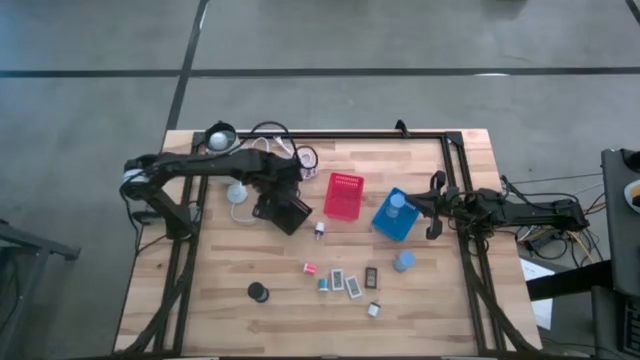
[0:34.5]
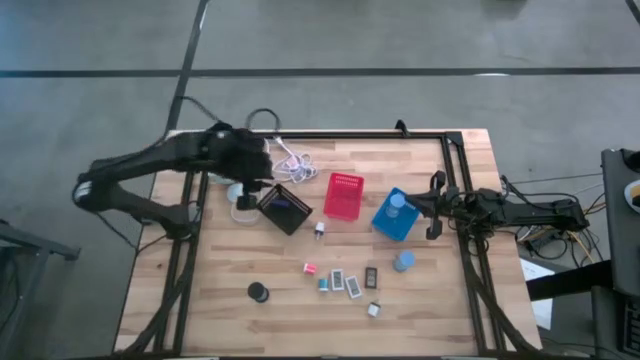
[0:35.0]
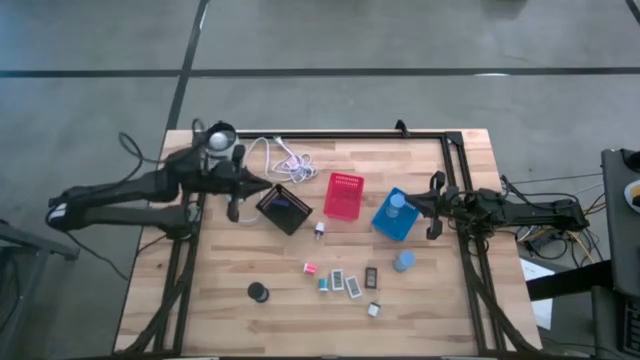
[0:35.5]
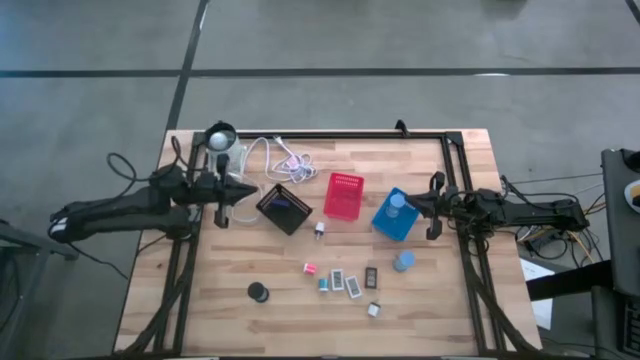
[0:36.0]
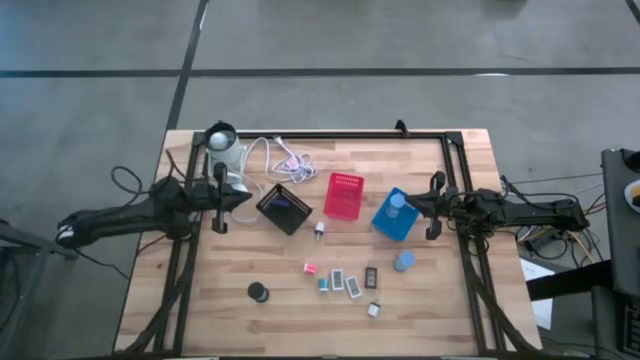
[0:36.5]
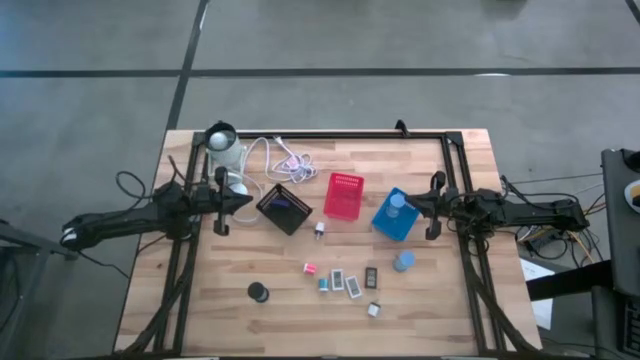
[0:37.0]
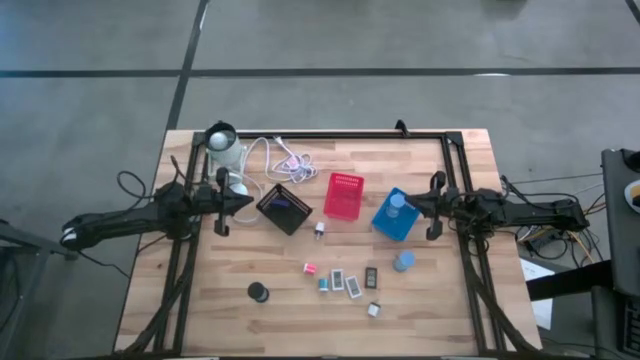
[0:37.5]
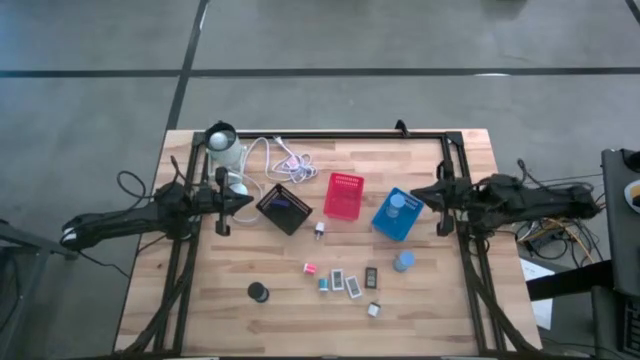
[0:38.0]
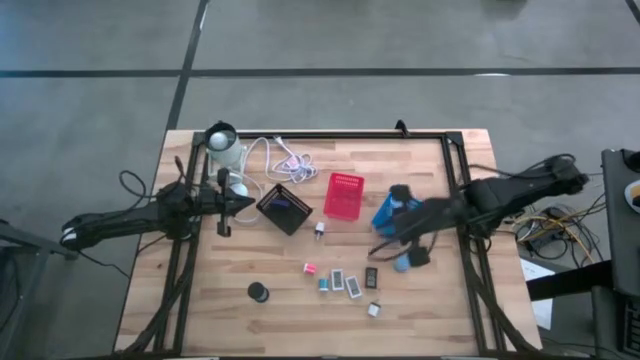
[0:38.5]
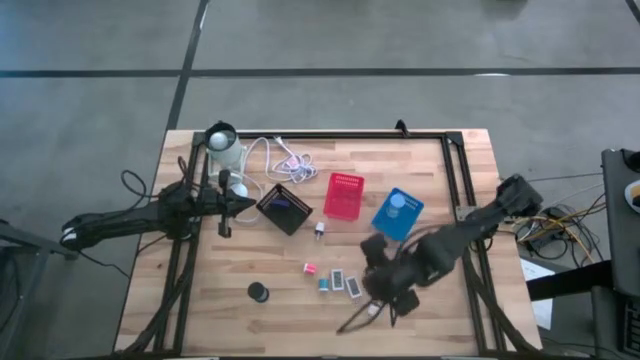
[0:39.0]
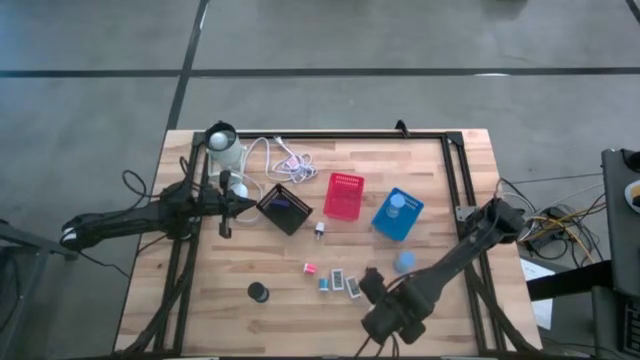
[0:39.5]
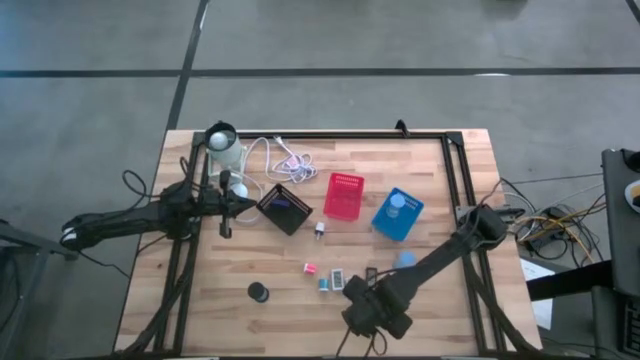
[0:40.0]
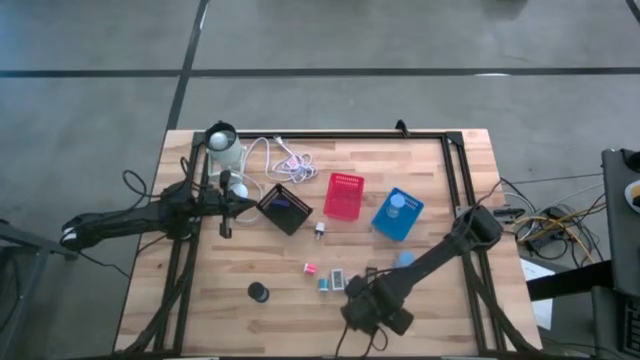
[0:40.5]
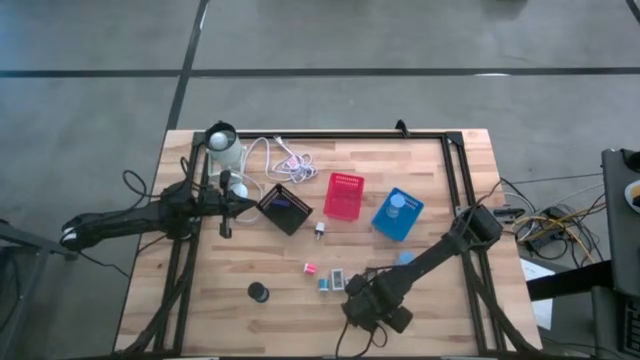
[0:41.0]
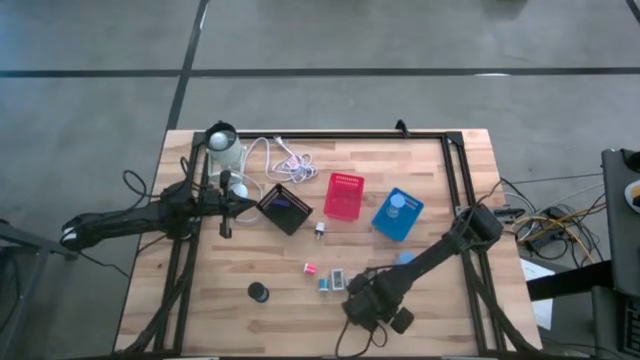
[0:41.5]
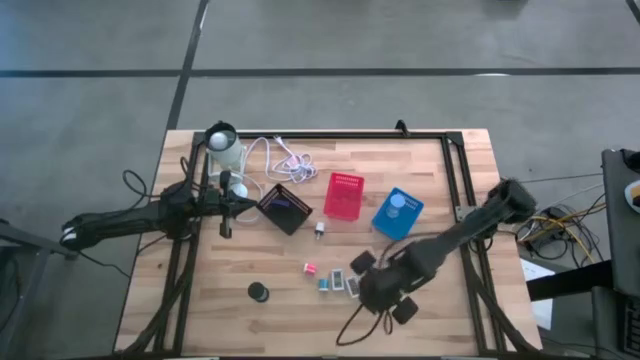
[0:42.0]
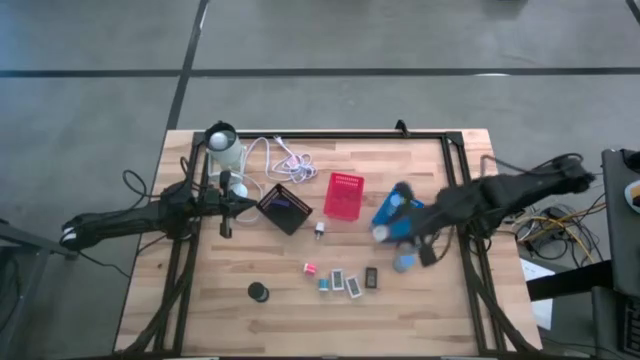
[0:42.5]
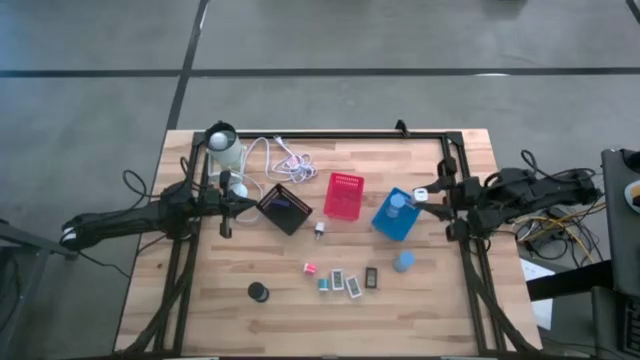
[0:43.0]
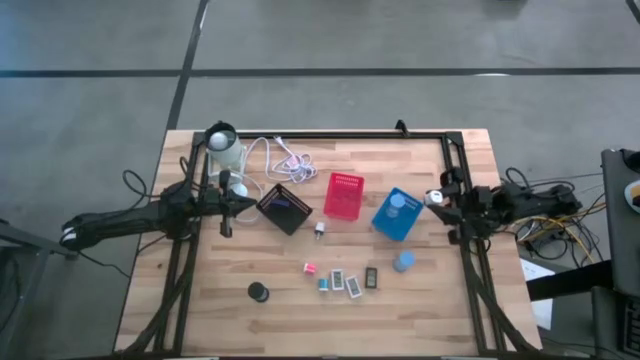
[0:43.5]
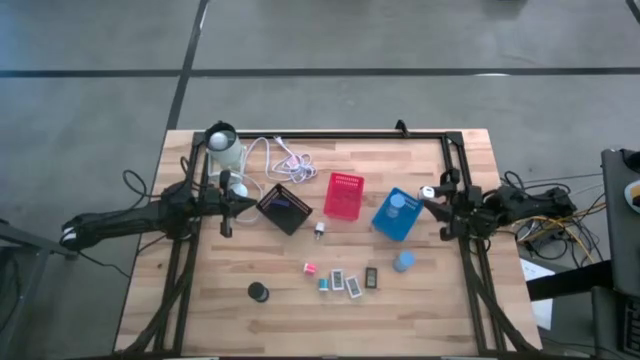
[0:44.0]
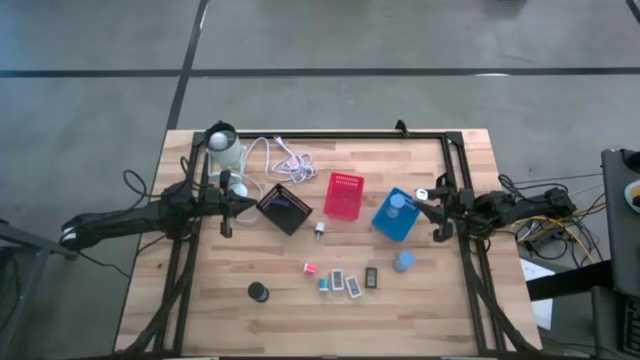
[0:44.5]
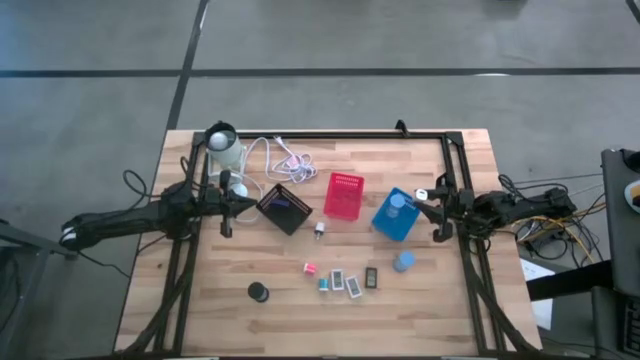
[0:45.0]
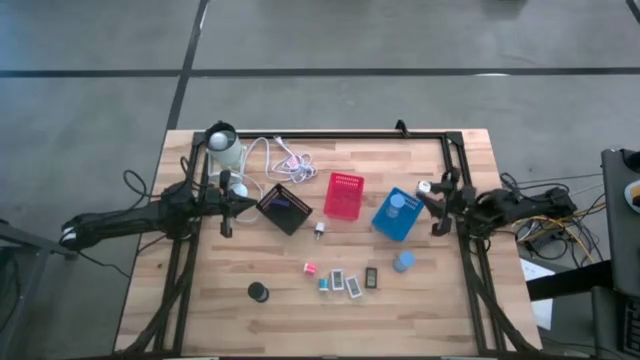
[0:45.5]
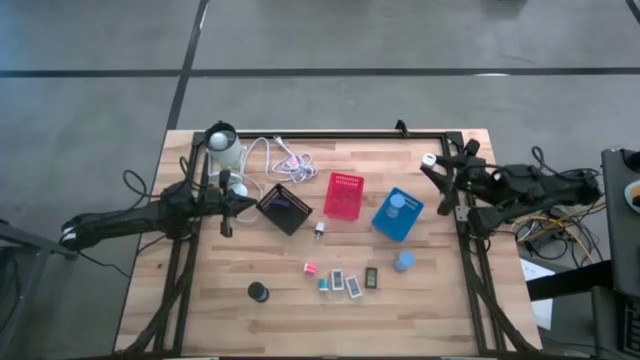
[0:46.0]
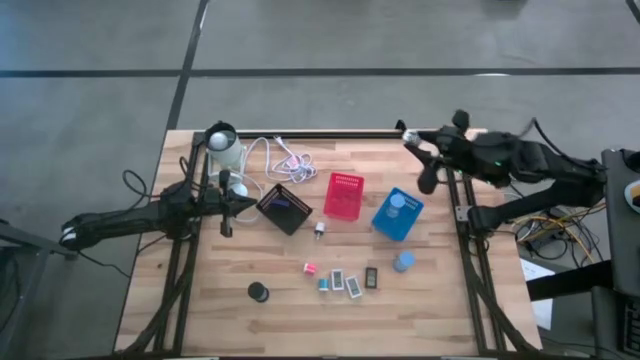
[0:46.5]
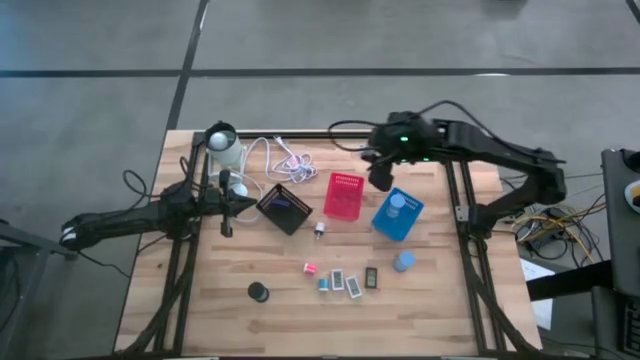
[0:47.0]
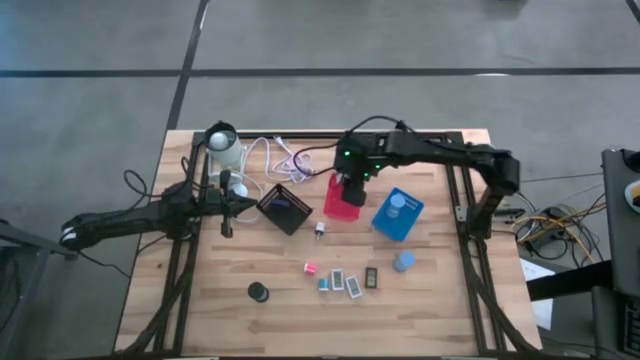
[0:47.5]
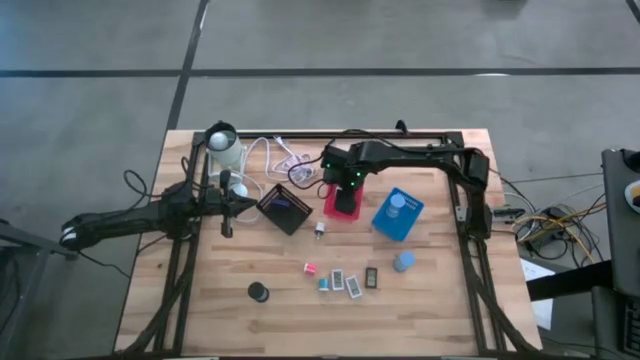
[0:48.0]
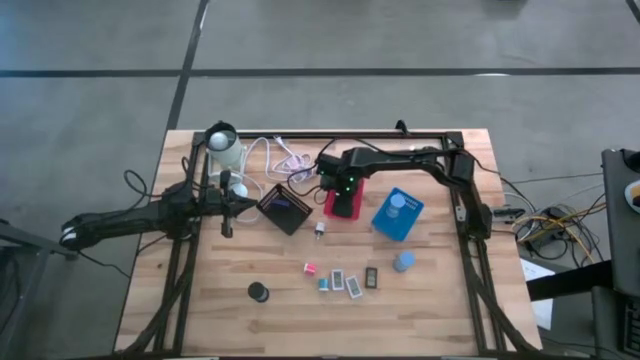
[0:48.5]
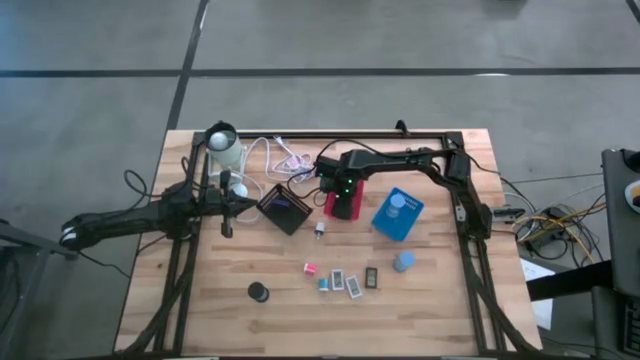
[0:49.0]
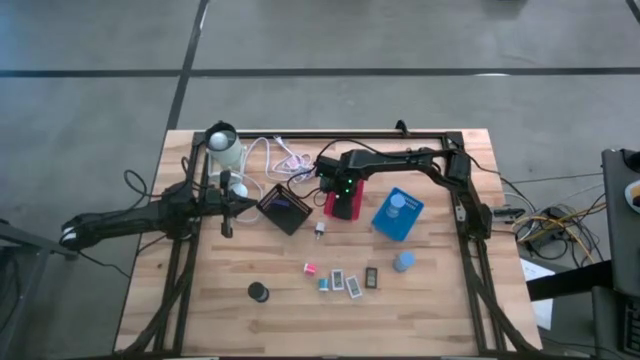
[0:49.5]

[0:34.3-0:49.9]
Task: Pick & Place Office items
Put the white charger adapter into the red basket

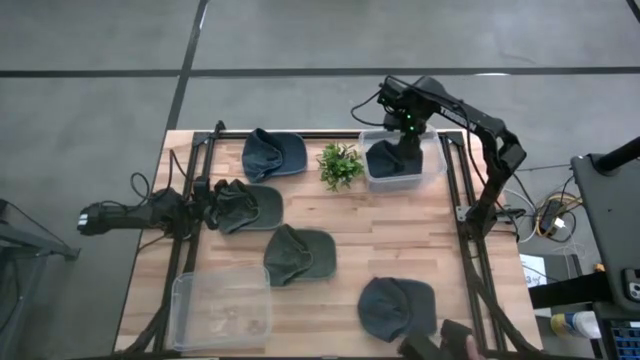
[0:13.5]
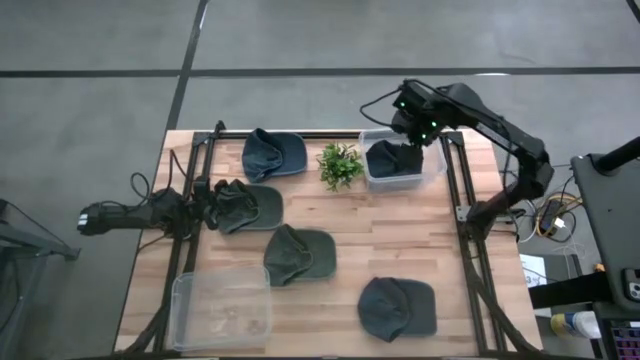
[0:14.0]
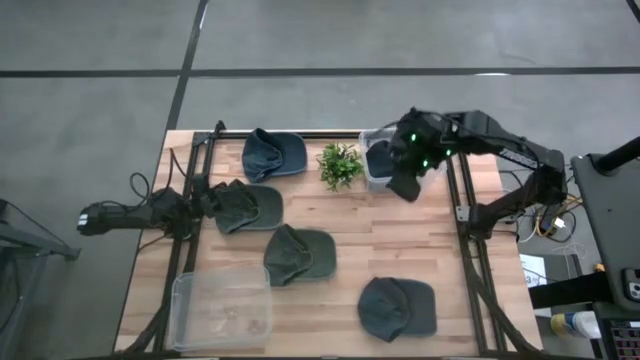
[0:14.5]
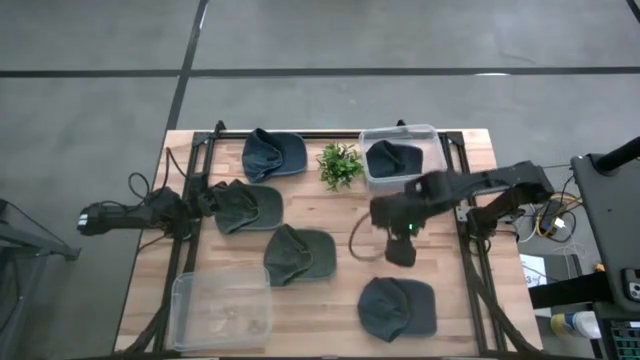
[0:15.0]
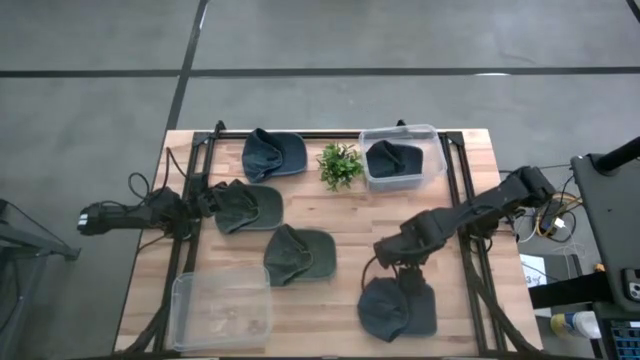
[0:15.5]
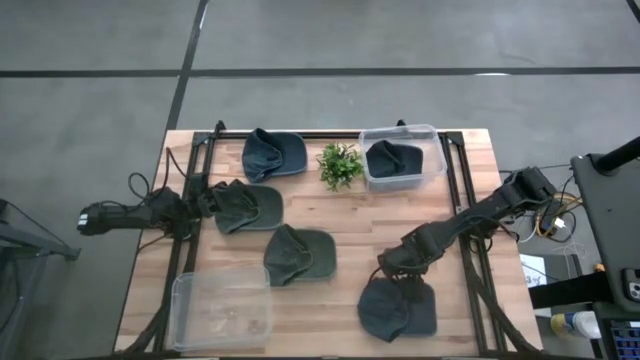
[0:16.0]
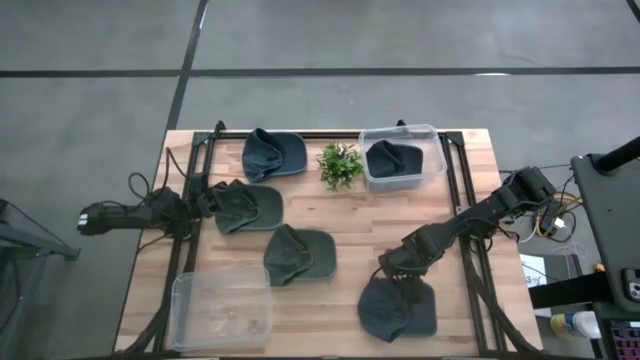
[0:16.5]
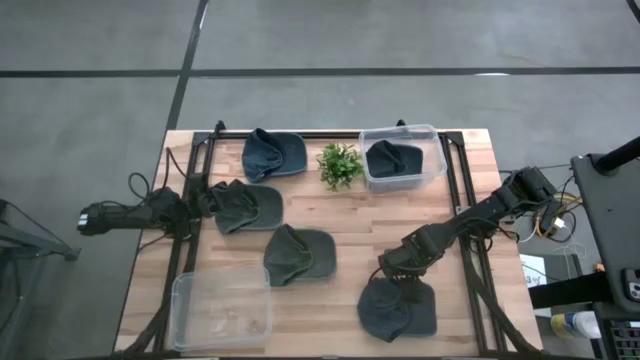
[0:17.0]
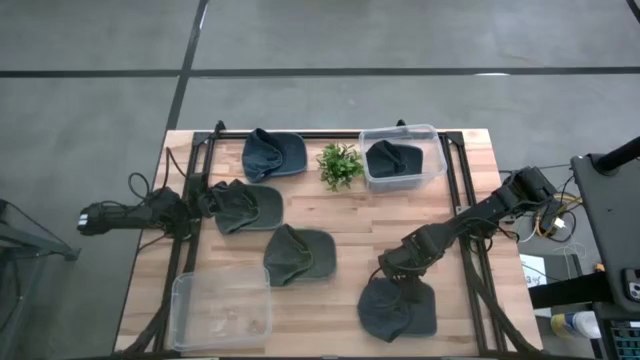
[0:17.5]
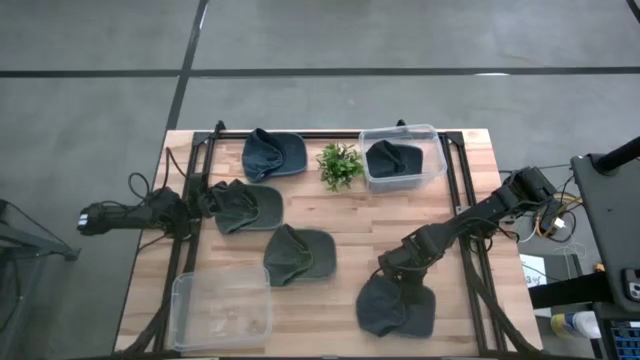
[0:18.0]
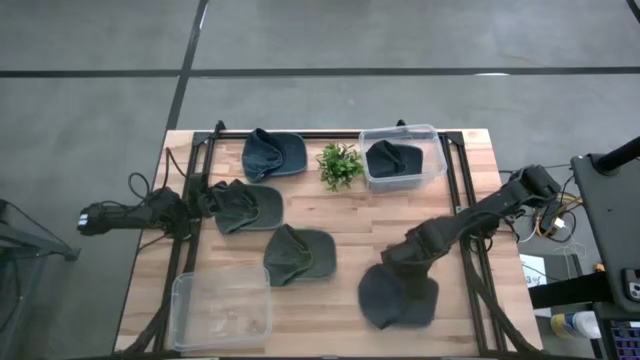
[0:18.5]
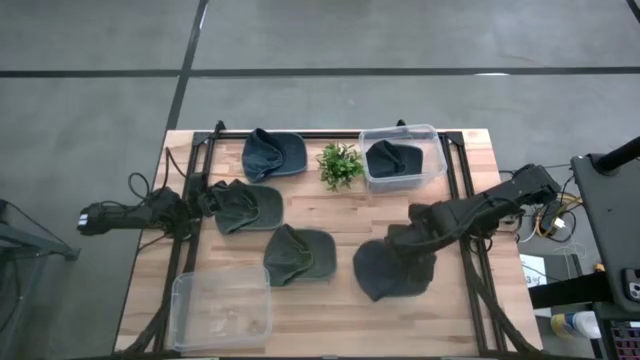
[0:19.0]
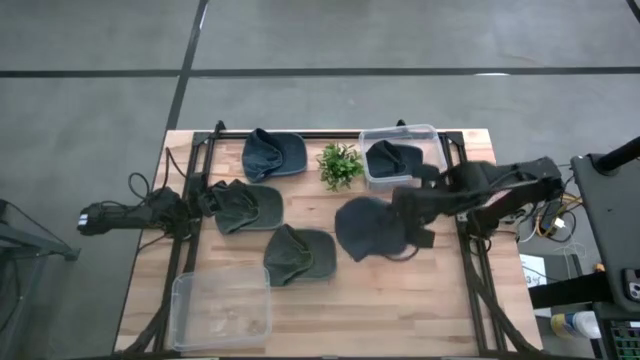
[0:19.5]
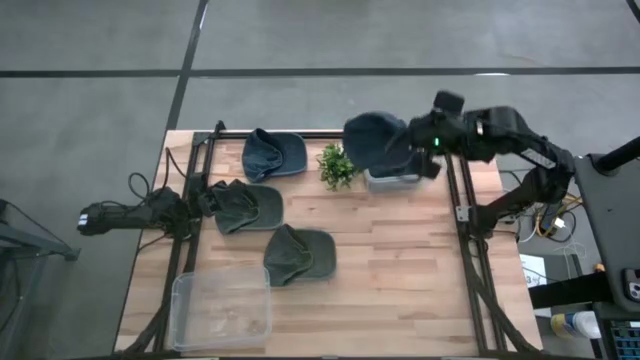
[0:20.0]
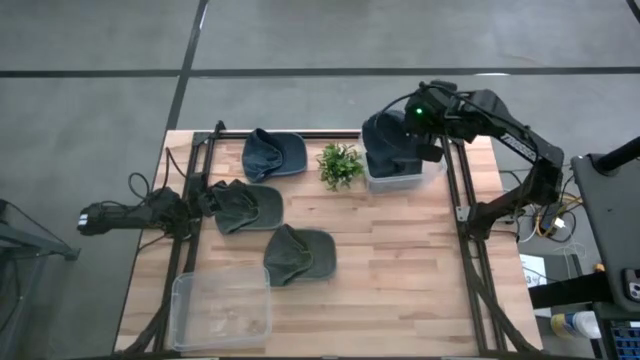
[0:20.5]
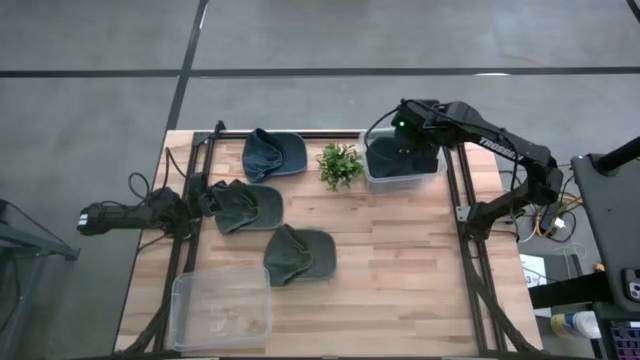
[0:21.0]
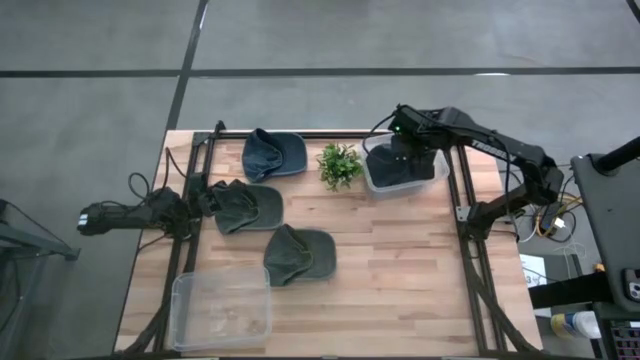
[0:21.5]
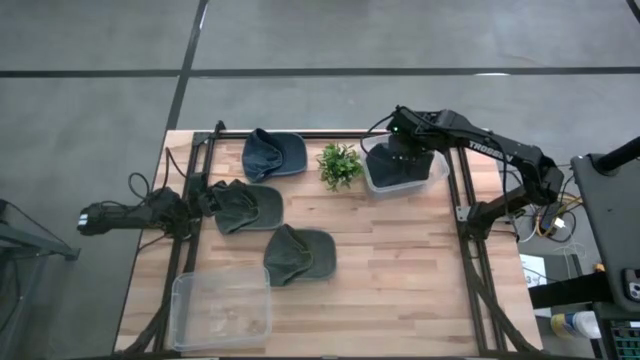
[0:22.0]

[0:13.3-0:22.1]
Task: Pick & Place hat
Put the bottom blue cap into the top transparent bin
